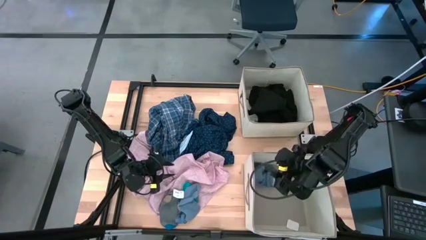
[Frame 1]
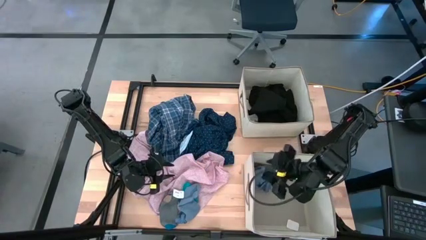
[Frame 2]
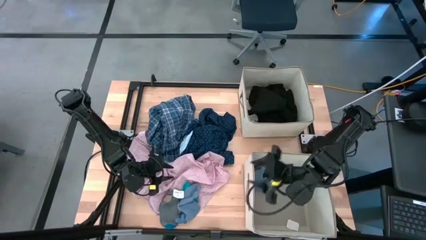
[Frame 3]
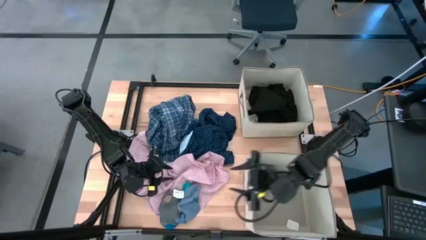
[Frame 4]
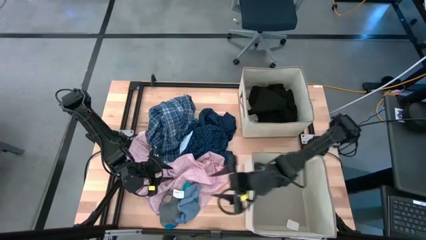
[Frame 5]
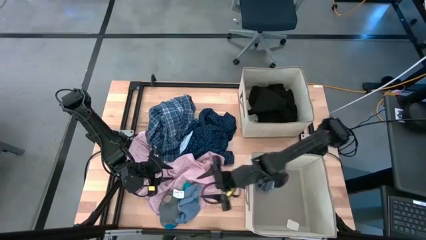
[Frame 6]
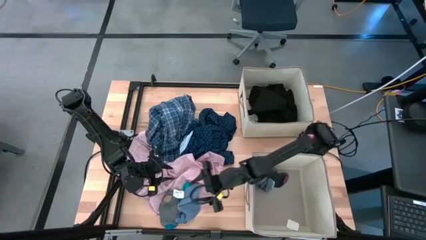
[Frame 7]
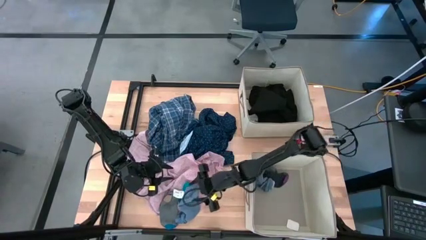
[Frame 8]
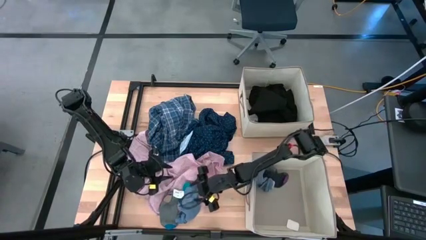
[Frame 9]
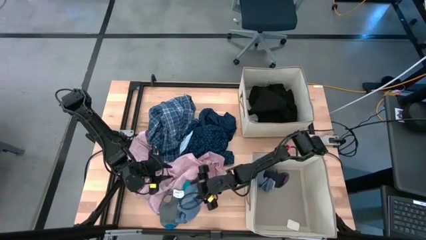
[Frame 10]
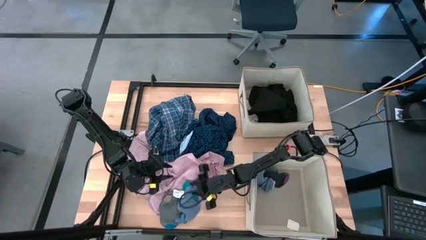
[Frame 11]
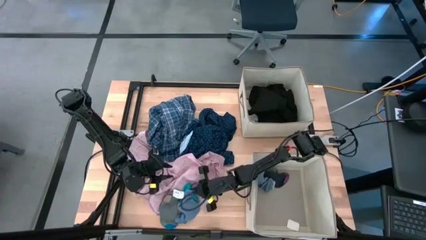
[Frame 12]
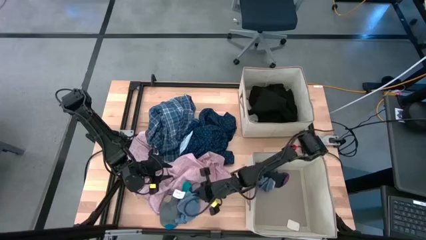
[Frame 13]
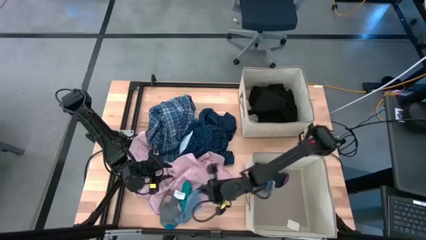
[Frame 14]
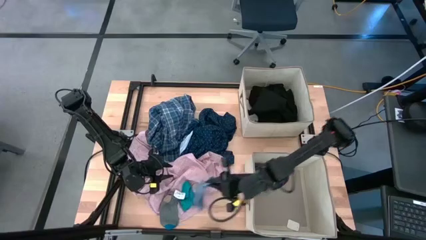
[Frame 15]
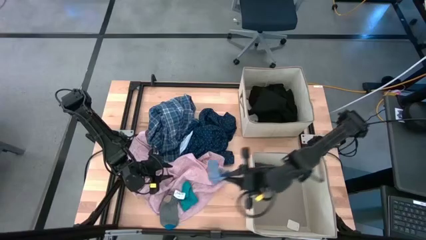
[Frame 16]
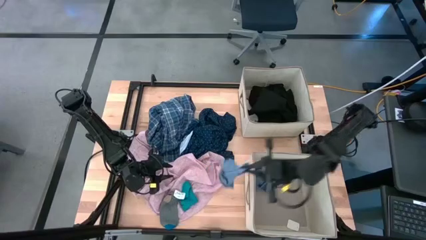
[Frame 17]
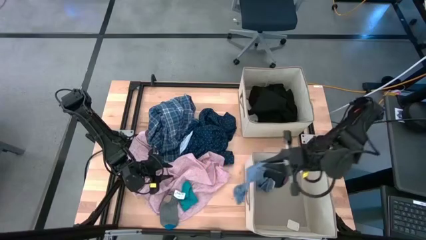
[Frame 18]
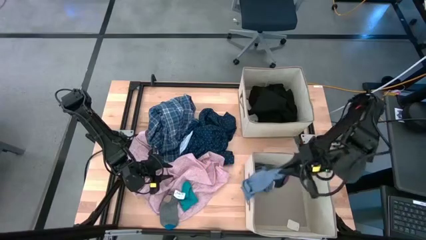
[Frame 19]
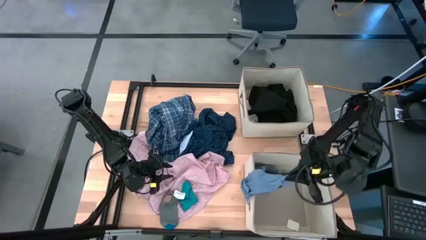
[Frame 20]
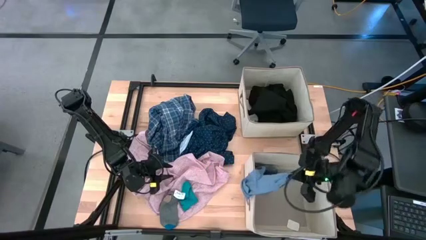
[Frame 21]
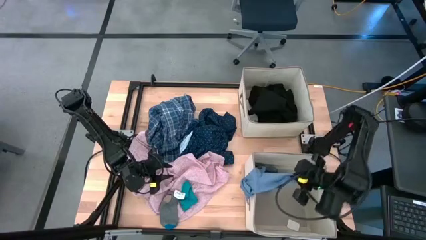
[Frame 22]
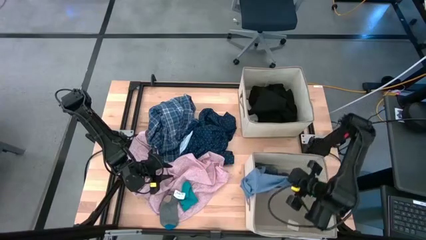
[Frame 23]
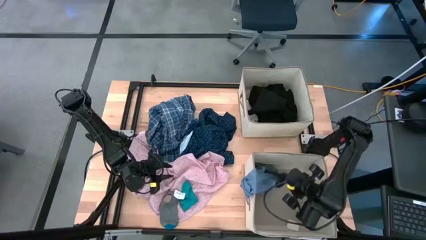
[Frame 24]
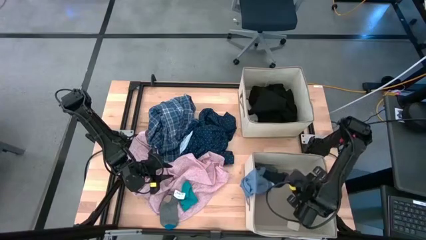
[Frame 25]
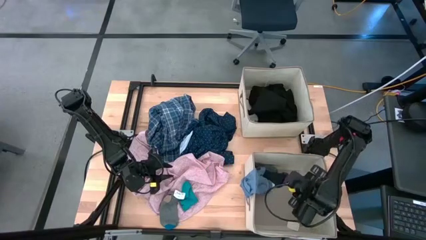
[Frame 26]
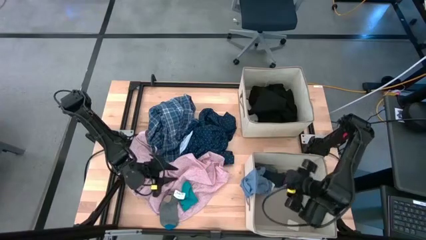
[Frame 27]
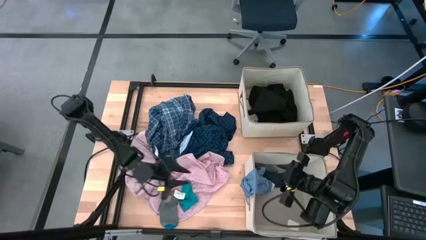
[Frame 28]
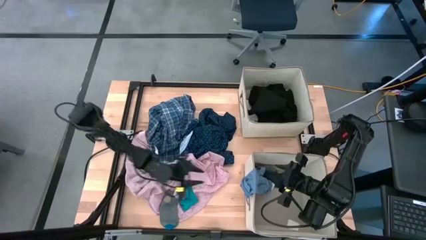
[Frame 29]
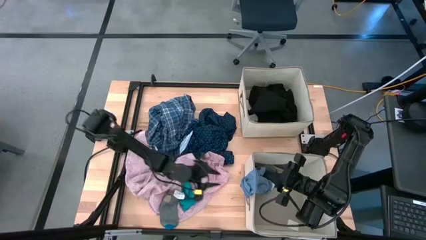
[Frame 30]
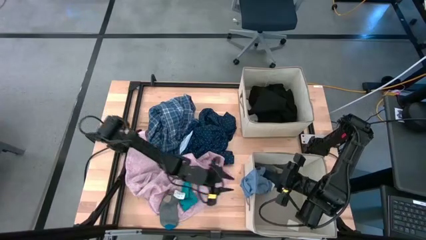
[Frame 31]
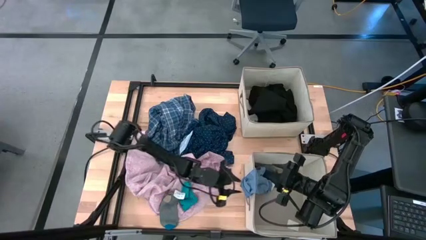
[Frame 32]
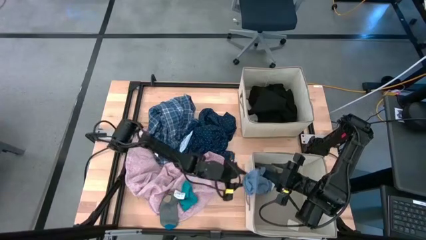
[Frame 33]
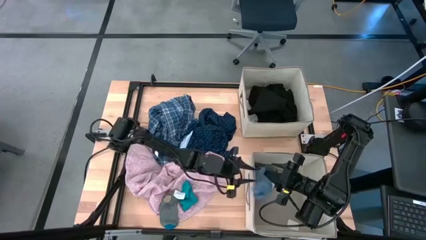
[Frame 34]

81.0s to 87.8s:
Task: Sort clothes
Put the blue long sock into the bottom laundry organizer

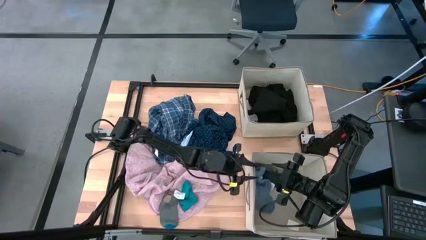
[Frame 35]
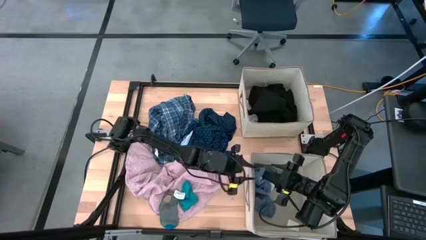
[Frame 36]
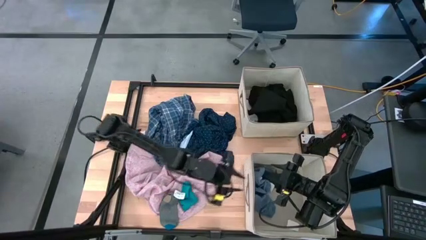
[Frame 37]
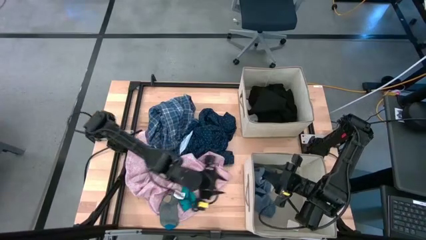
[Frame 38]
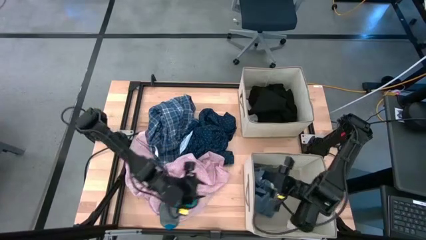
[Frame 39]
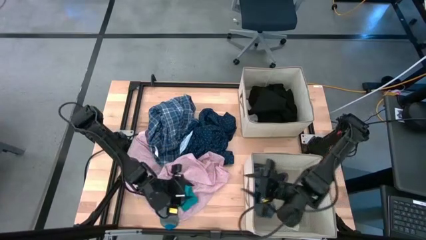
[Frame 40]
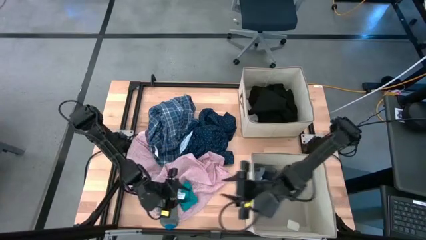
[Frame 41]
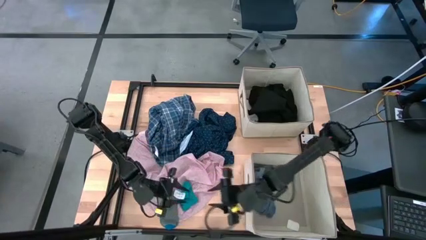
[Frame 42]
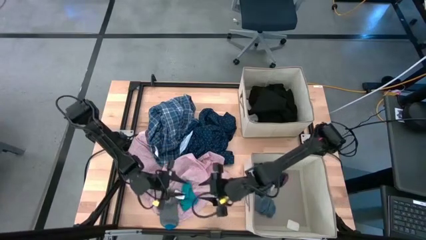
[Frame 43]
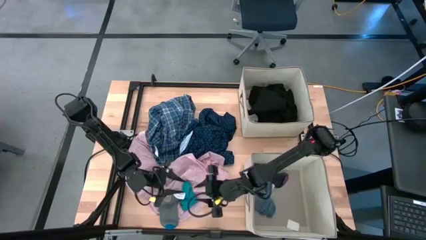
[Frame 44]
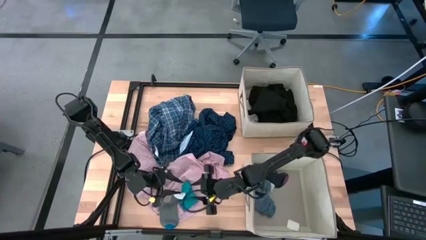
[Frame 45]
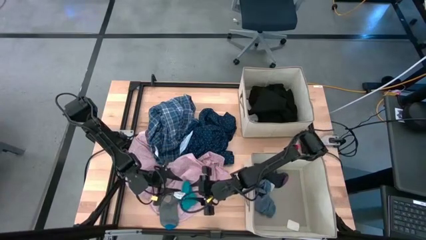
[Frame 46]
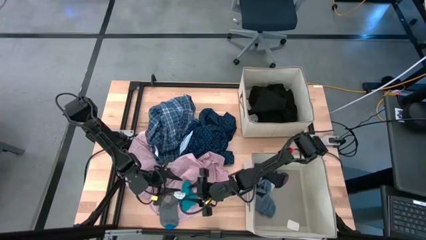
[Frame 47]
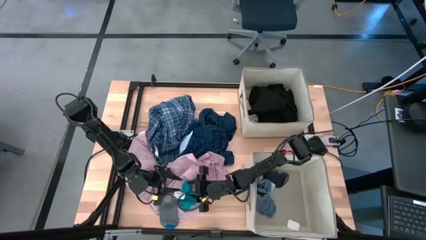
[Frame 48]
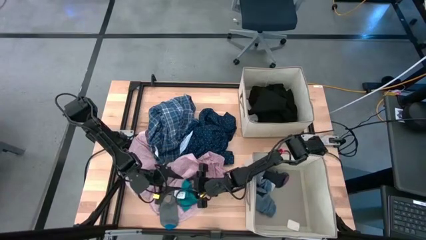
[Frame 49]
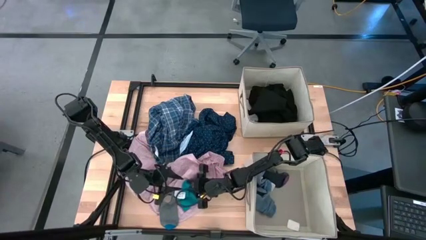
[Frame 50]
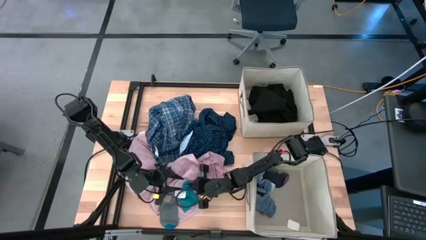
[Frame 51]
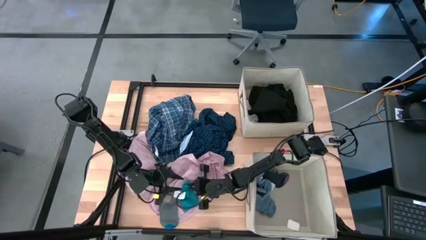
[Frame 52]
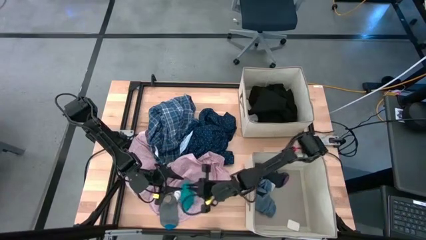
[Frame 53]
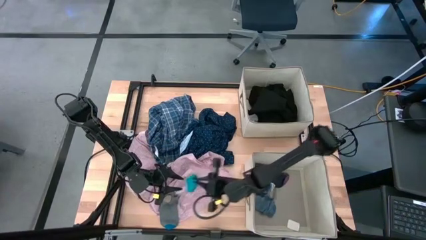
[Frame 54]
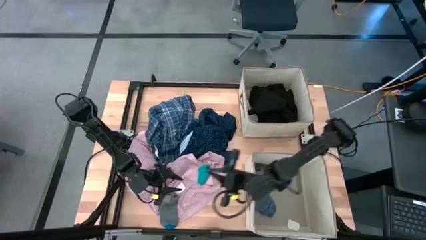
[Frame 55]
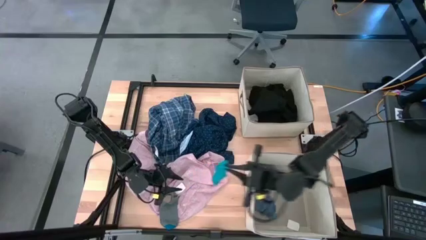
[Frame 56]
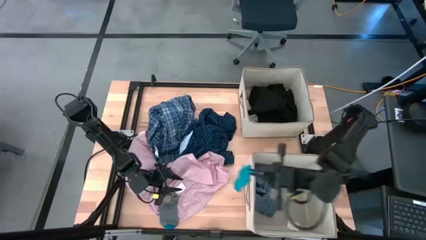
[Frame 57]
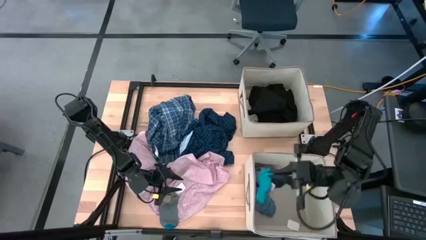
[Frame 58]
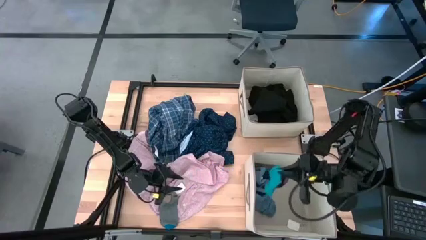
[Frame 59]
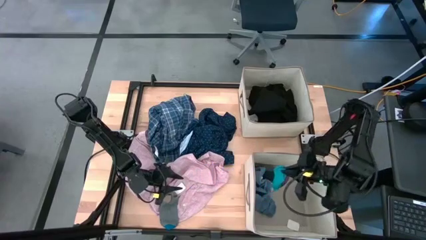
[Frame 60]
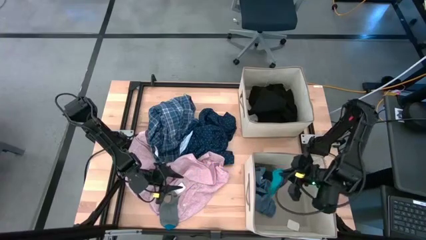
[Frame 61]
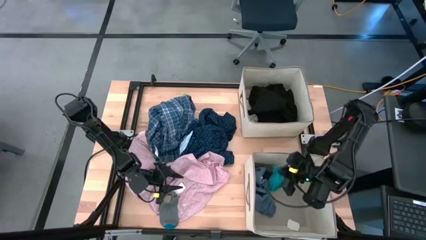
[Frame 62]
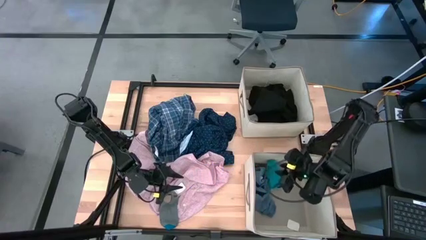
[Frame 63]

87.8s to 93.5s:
Put the blue sock into the bottom laundry organizer

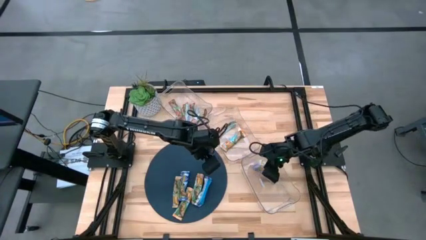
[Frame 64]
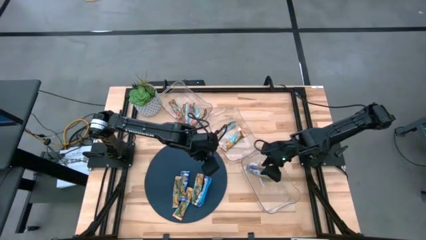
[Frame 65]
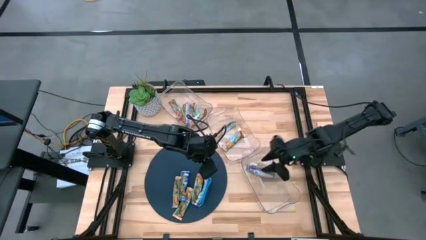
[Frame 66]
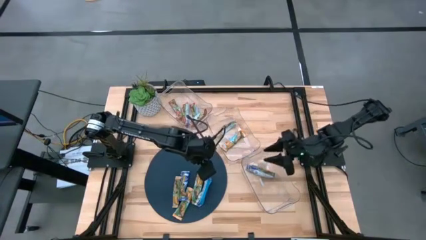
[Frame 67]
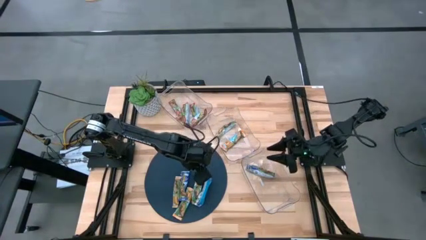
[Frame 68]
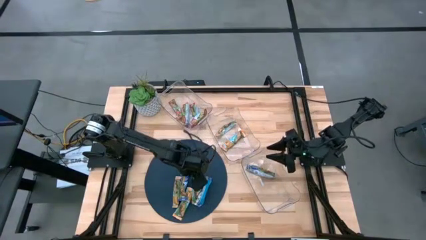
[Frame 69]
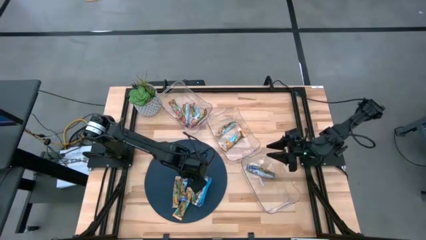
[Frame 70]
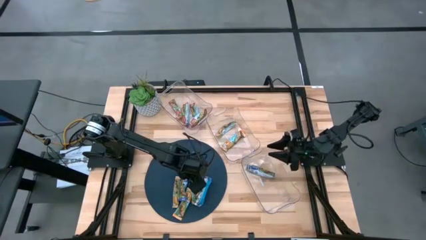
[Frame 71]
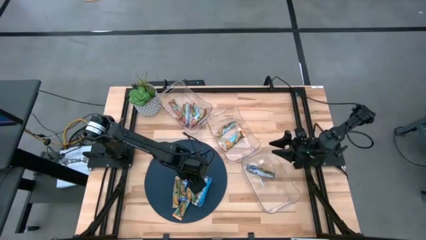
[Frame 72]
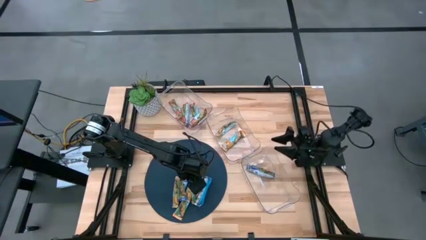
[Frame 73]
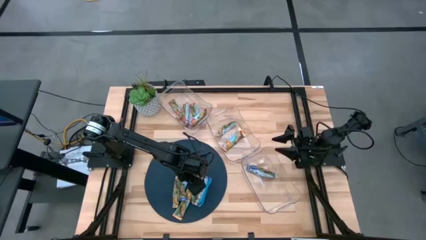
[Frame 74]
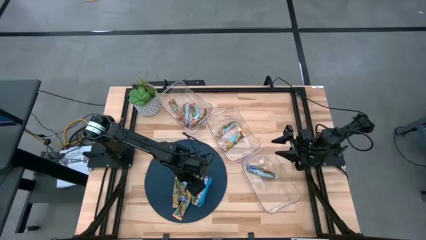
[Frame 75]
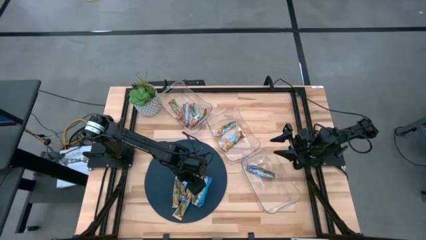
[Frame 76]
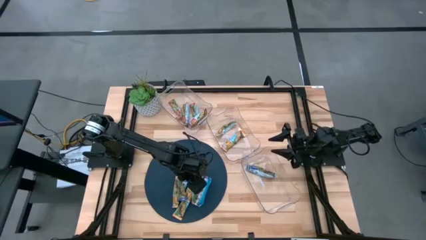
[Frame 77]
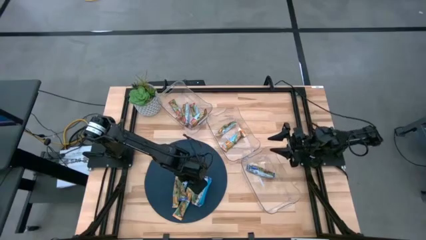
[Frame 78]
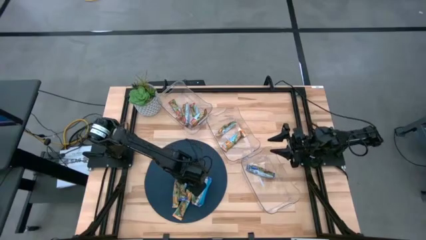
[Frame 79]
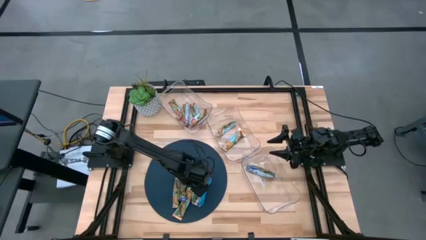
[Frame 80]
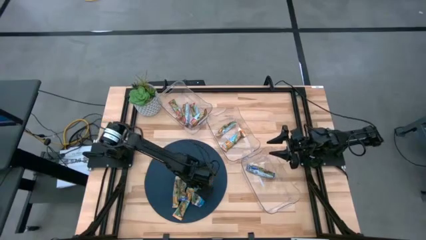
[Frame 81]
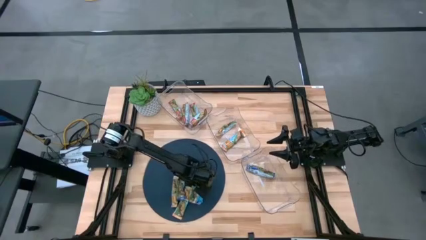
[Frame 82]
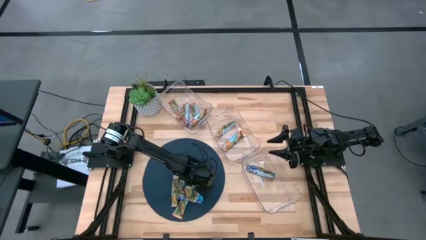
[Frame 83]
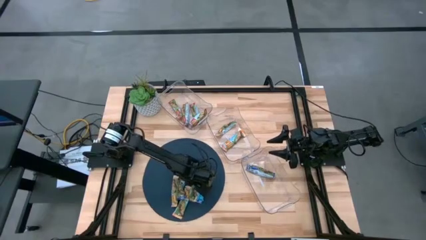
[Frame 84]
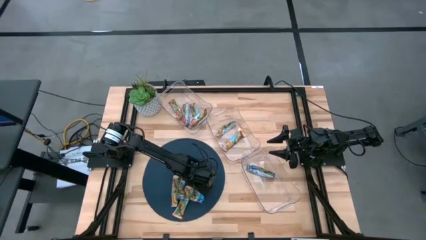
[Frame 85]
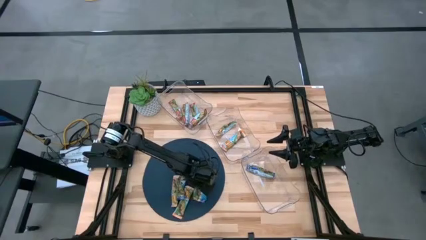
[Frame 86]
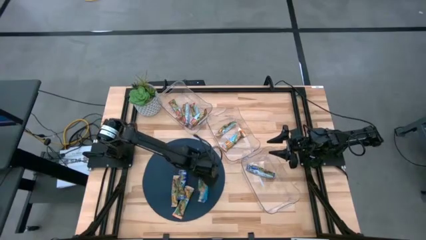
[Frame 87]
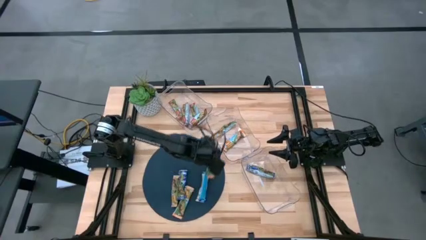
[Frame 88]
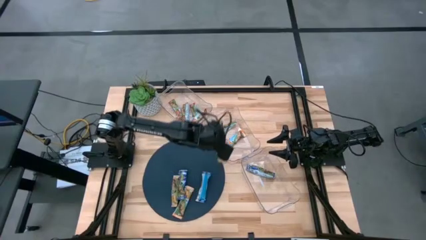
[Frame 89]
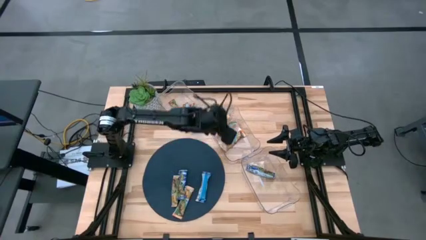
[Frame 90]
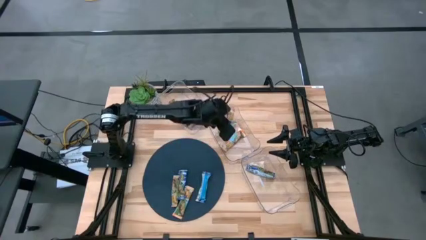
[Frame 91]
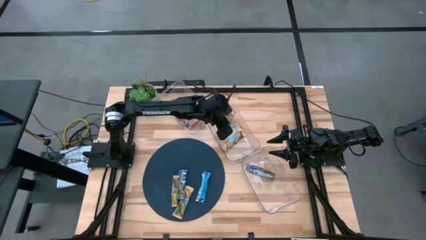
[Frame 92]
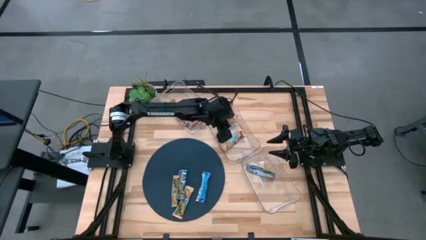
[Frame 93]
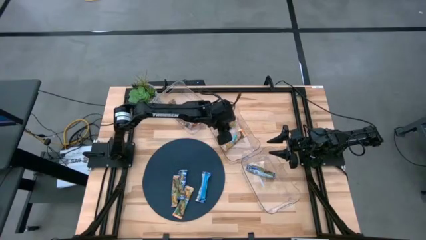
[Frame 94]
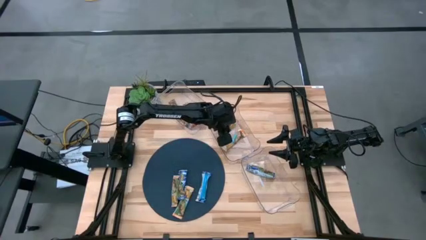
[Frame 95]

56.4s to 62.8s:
Task: Pick and place Granola Bars by type
Put the yellow granola bar into the middle transparent bin
